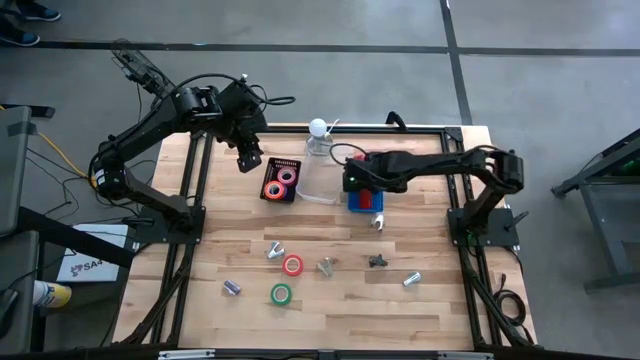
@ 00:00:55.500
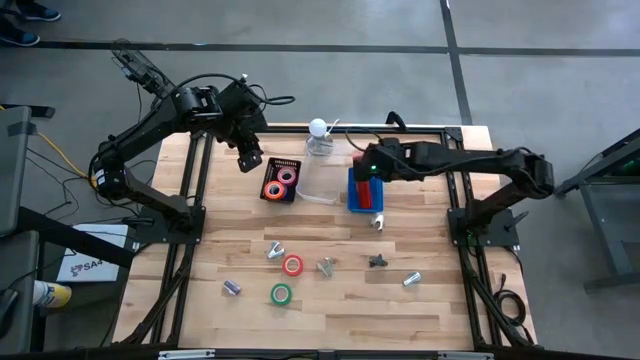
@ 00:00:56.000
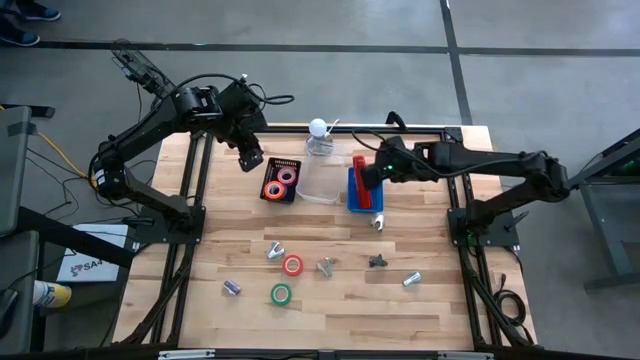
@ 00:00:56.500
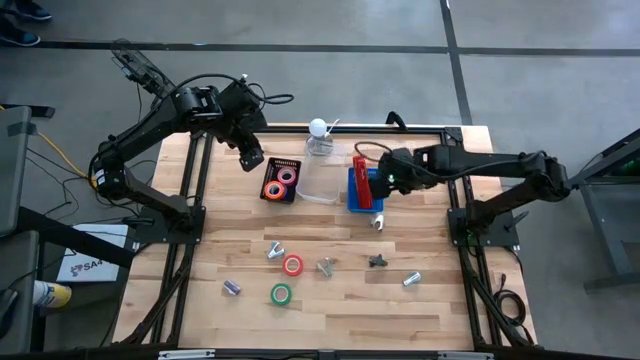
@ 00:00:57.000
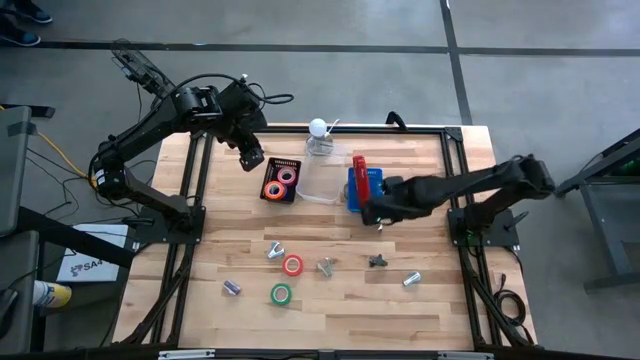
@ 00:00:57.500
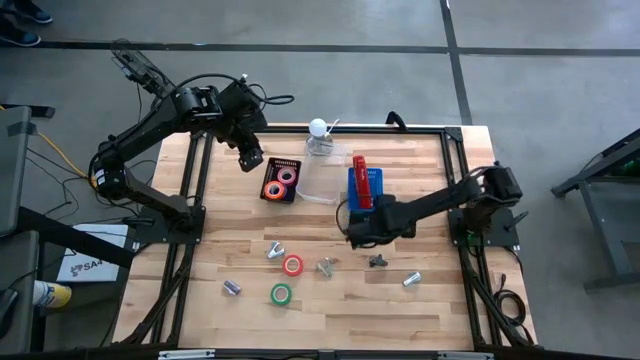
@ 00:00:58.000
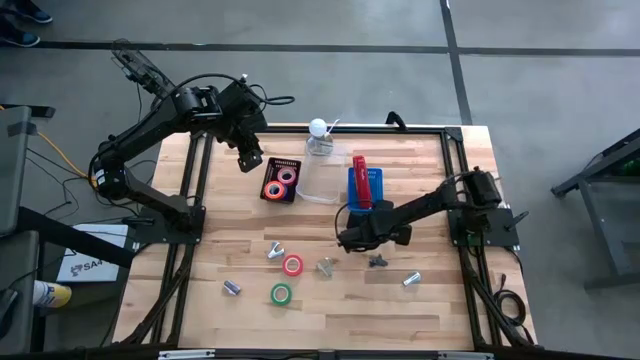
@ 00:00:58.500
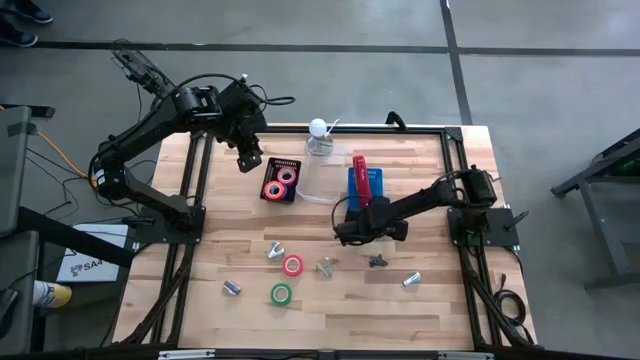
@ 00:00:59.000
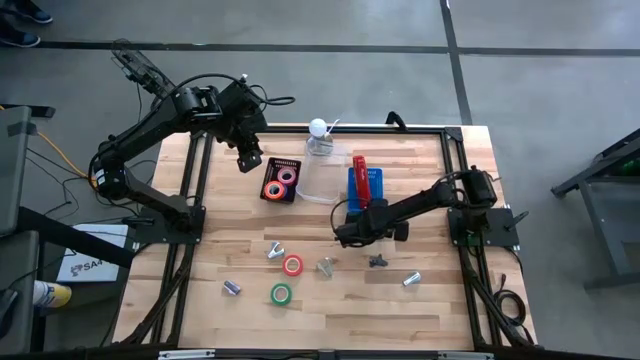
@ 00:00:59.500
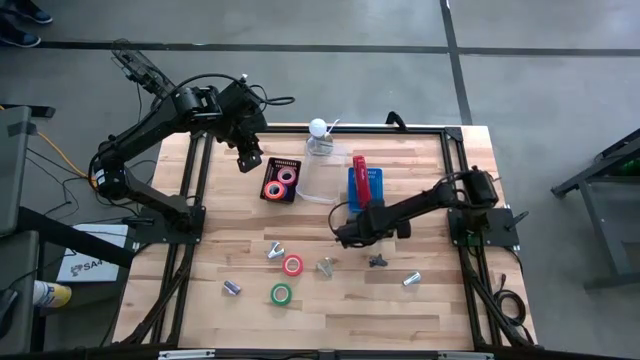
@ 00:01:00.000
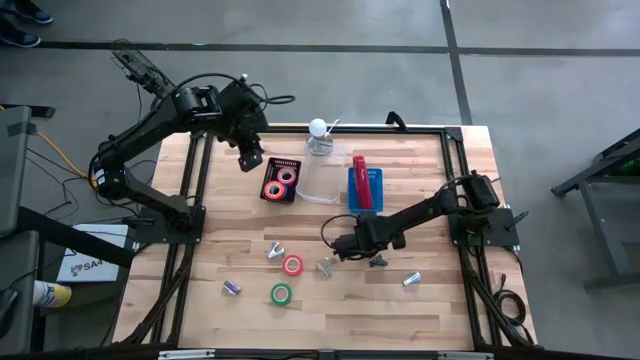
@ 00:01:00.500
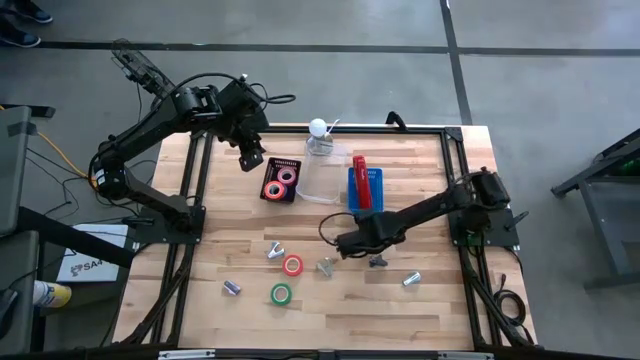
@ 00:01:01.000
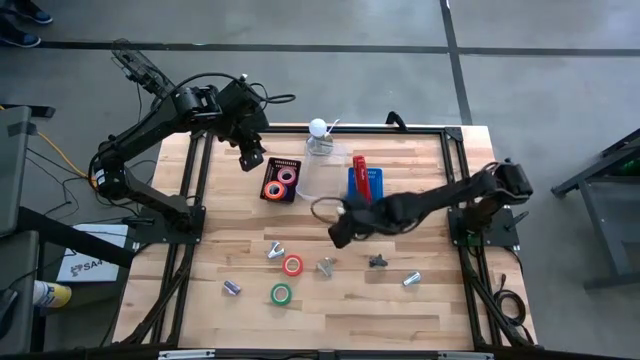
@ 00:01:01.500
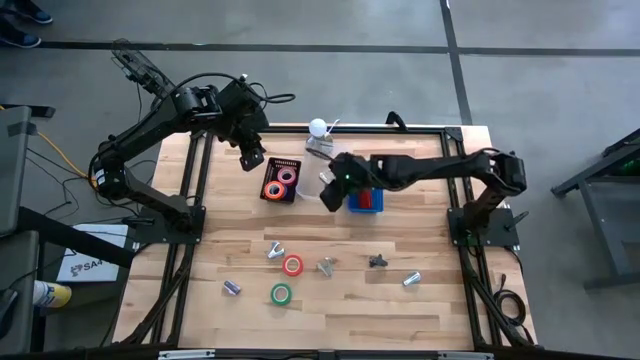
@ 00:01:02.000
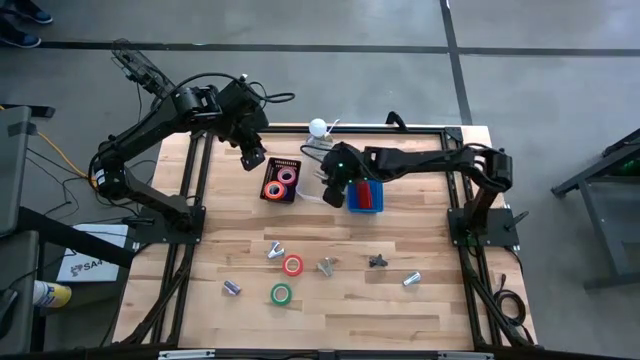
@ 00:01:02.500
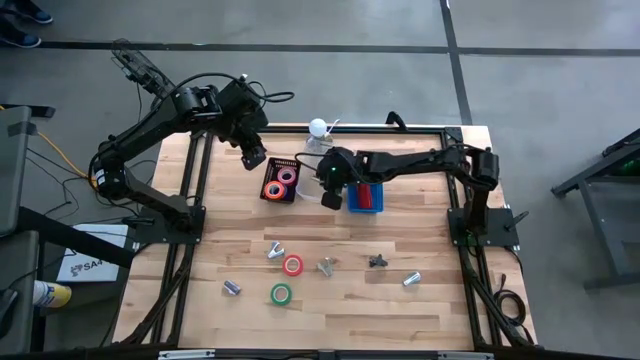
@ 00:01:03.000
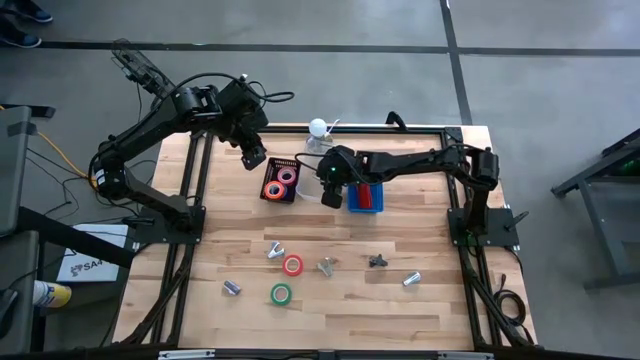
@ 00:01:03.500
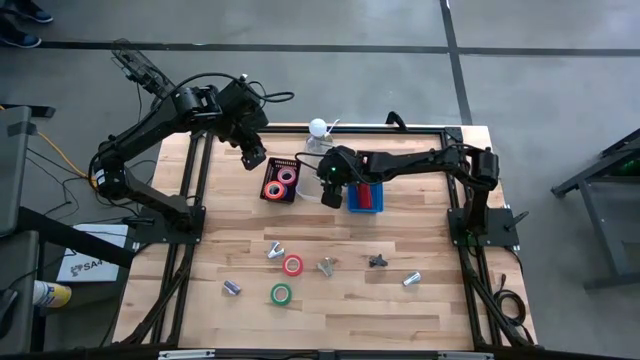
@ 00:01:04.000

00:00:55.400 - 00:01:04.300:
Task: Pick and place Stapler, Stapler remover, tape
Put the top gray staple remover into the transparent bin

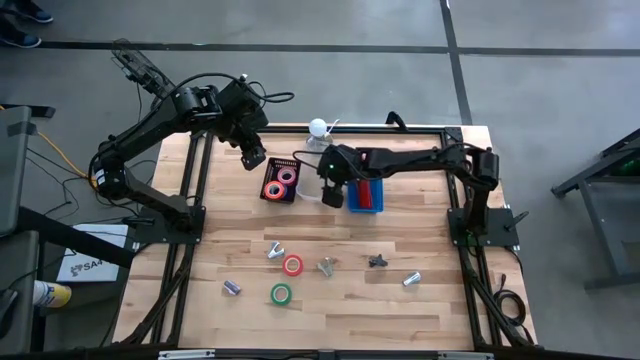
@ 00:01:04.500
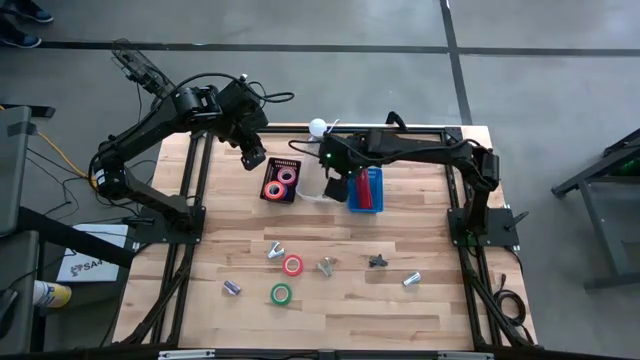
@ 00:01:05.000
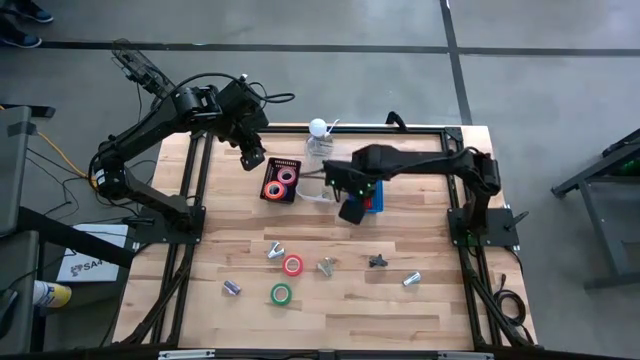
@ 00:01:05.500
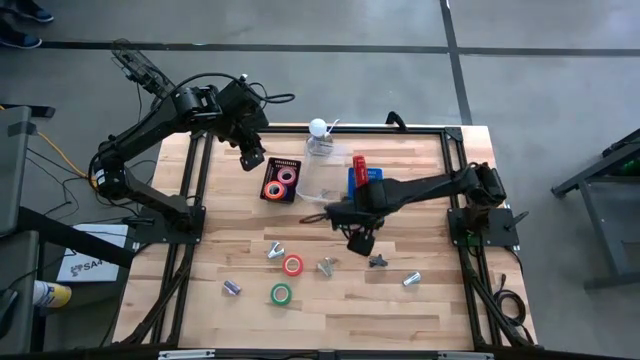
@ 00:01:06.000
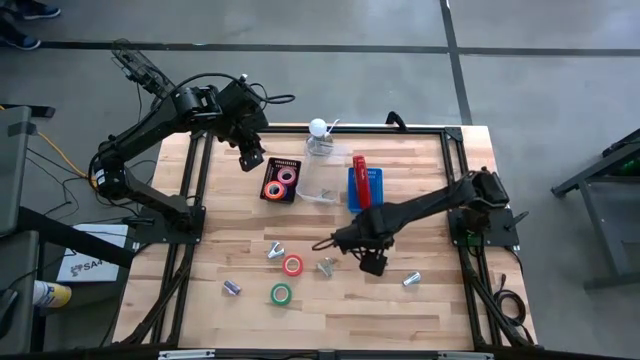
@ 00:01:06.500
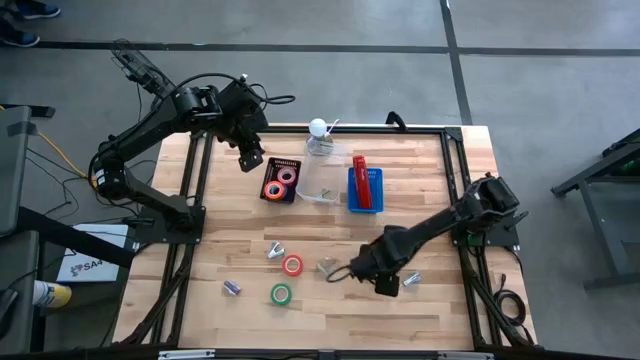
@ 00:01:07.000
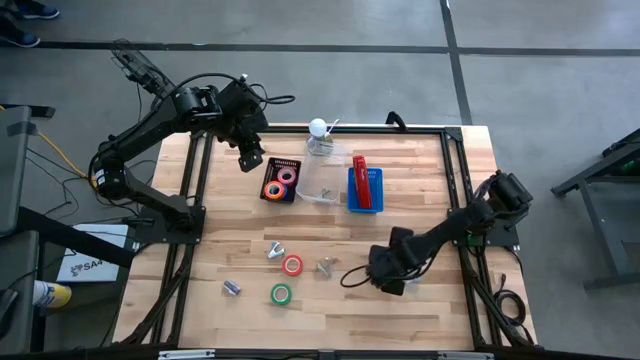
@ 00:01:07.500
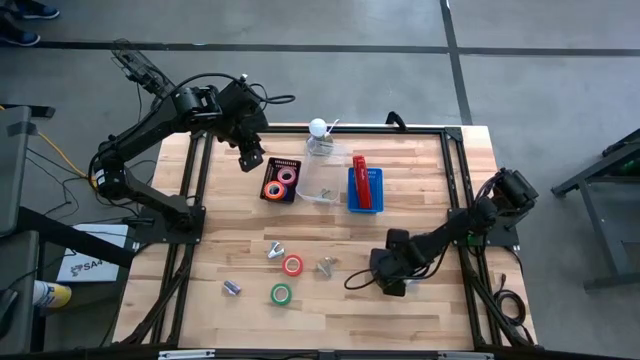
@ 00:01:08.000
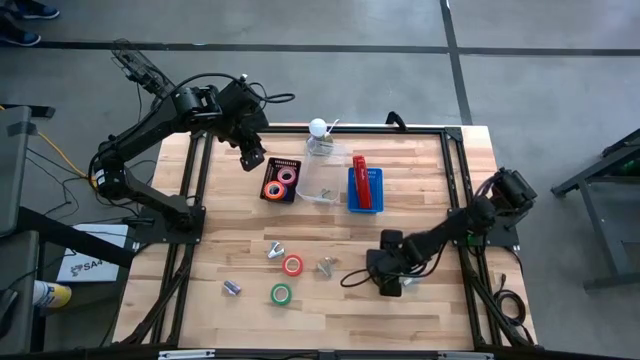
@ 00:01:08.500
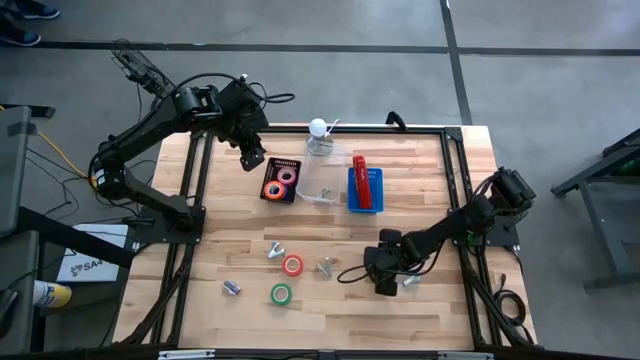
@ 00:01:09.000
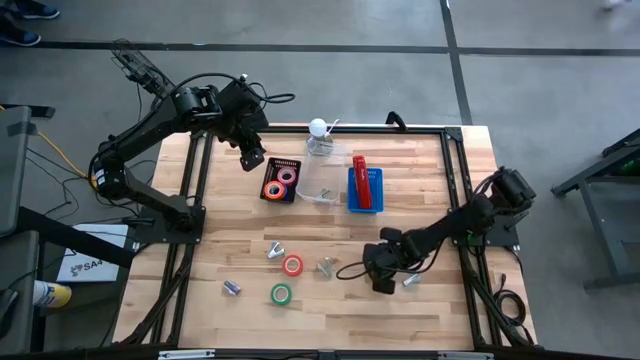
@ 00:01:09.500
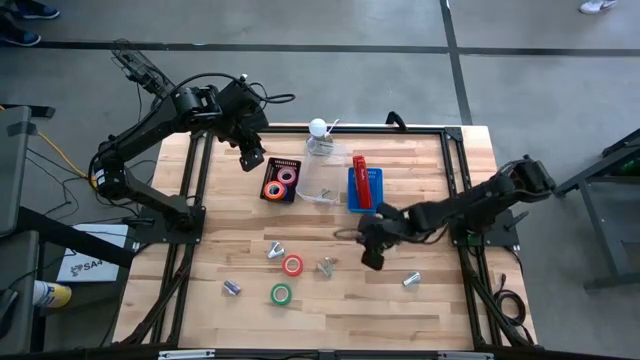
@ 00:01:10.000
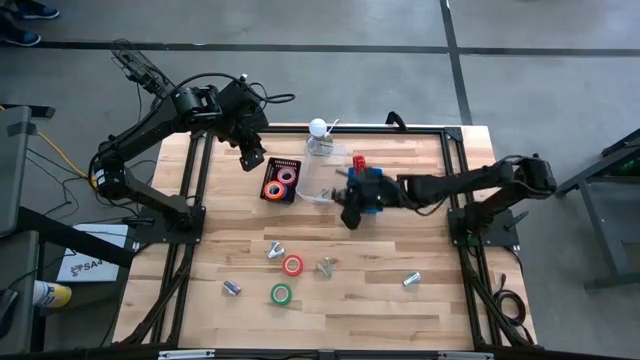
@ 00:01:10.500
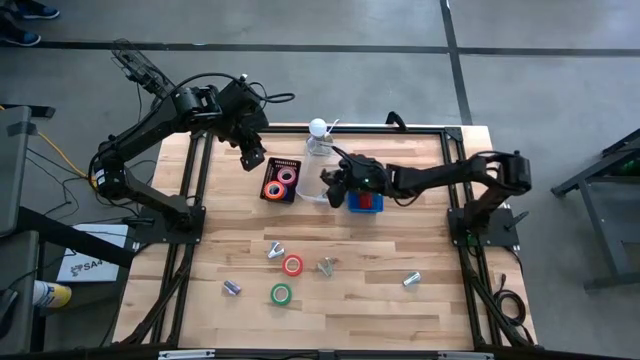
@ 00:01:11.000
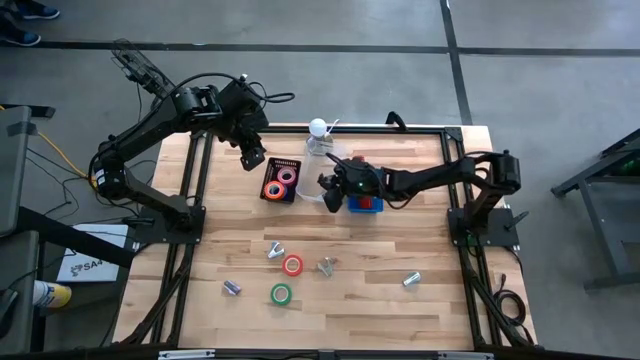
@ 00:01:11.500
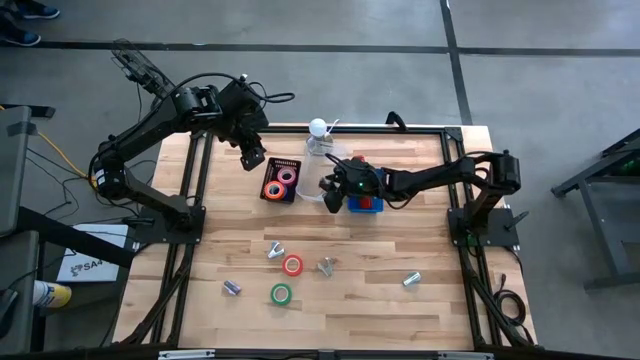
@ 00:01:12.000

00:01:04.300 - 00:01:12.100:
Put the black staple remover into the transparent bin

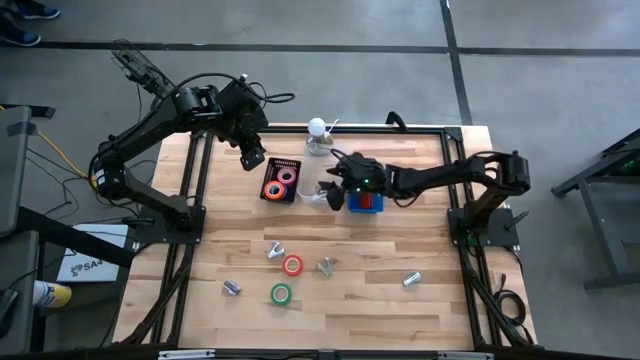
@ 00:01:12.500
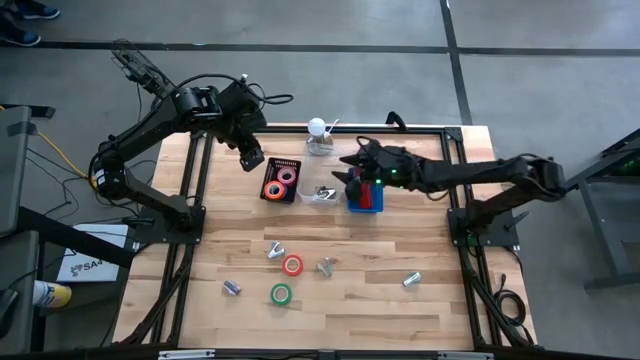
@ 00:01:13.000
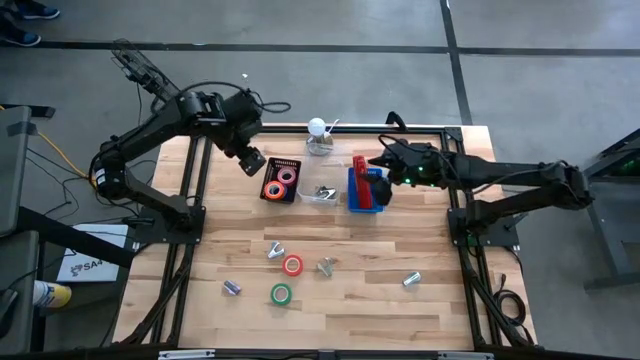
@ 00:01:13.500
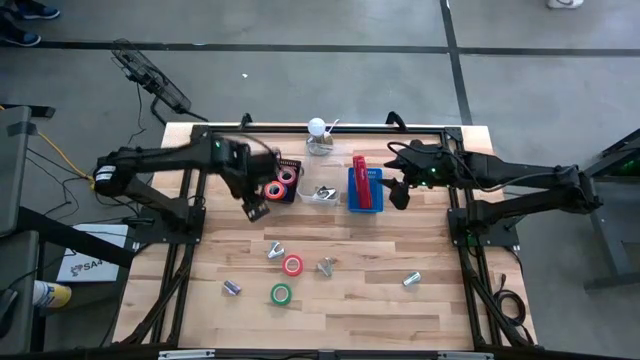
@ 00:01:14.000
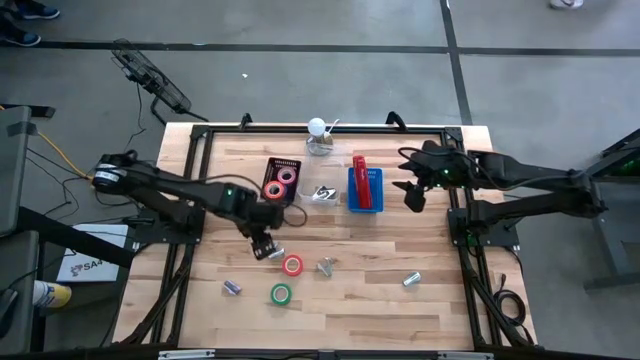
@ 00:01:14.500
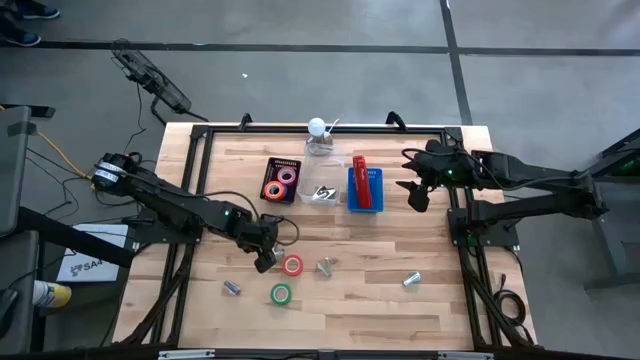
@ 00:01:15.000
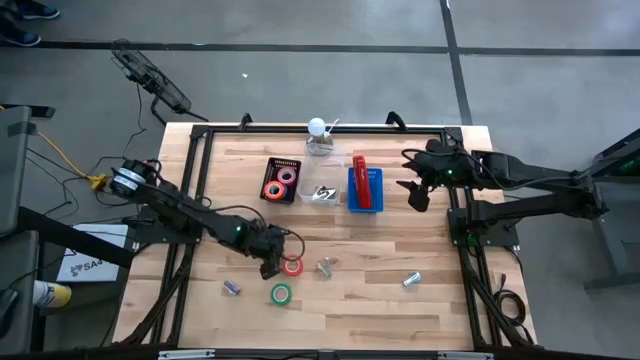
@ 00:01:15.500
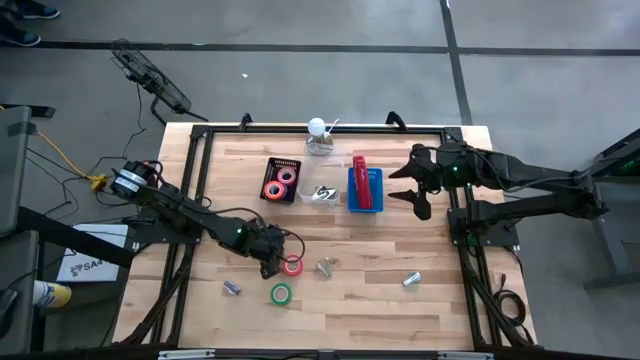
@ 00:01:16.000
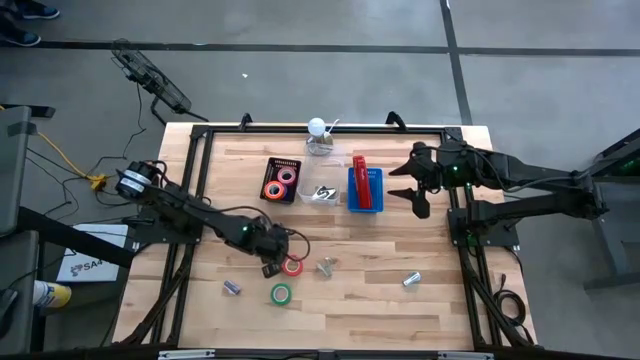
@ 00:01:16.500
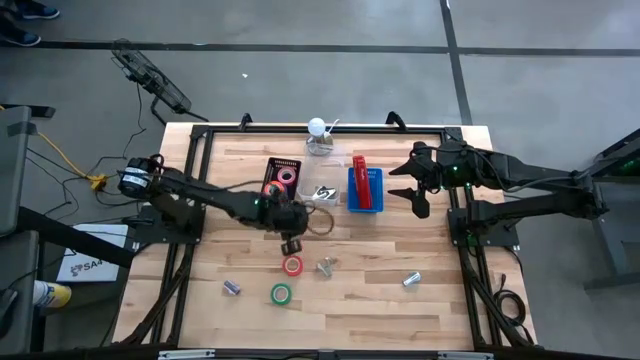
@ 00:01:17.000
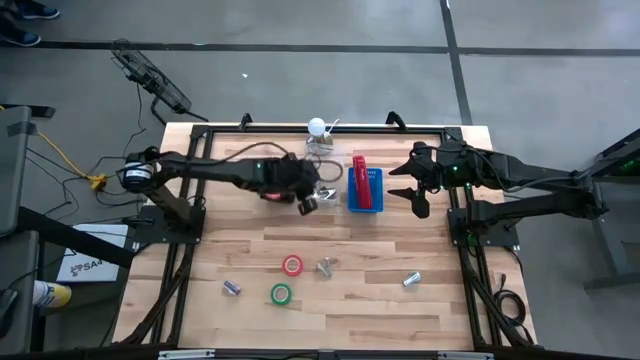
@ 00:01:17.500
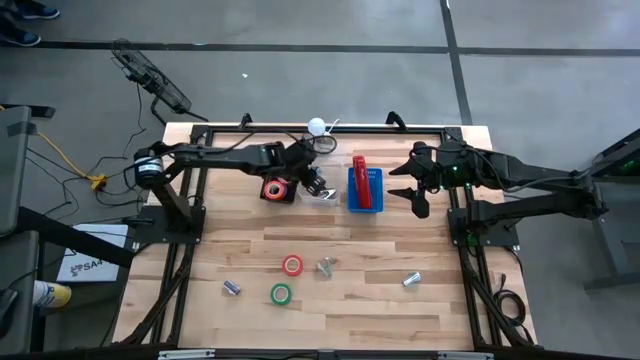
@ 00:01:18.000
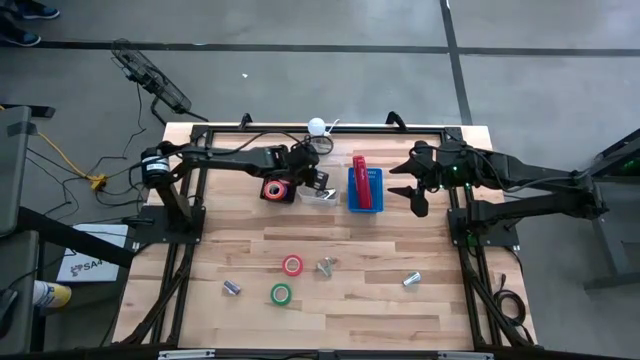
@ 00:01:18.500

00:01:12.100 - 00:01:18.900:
Put the left blue staple remover into the transparent bin
